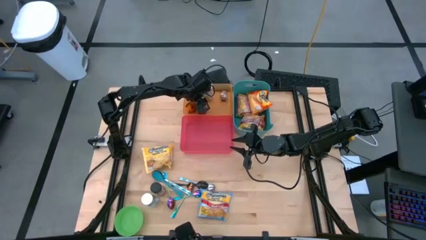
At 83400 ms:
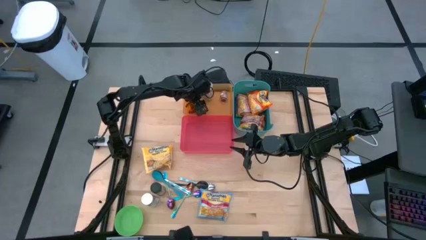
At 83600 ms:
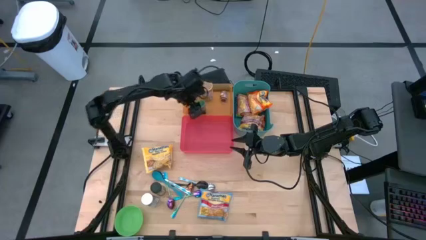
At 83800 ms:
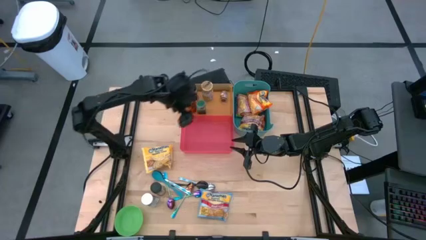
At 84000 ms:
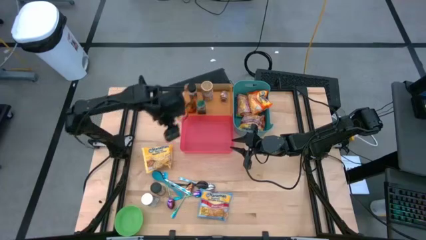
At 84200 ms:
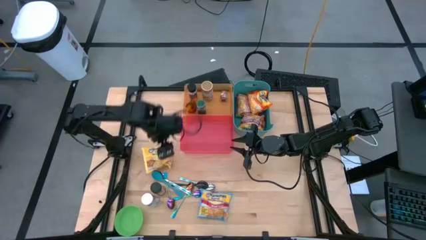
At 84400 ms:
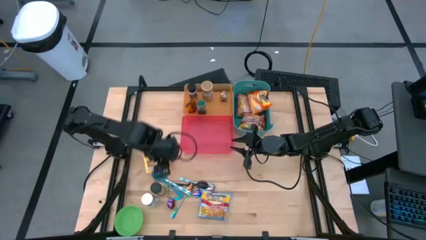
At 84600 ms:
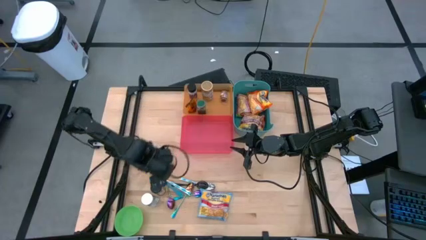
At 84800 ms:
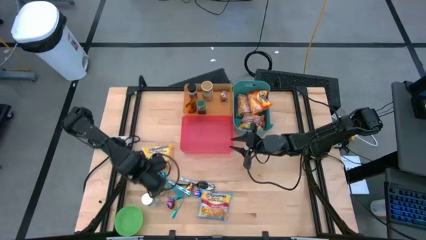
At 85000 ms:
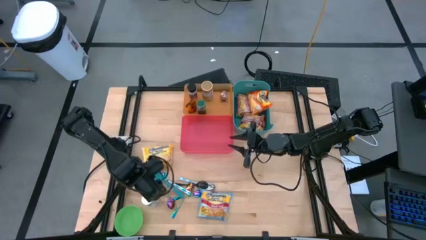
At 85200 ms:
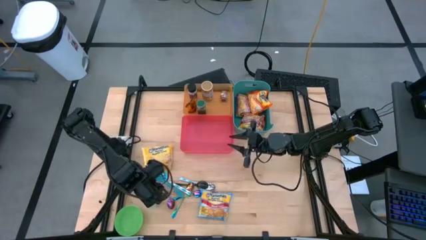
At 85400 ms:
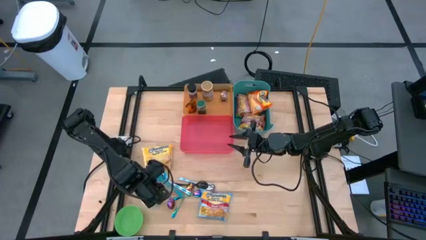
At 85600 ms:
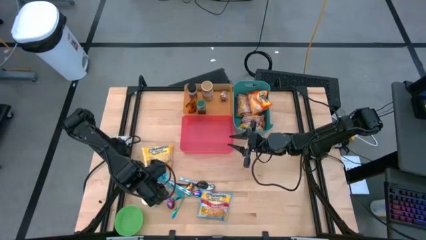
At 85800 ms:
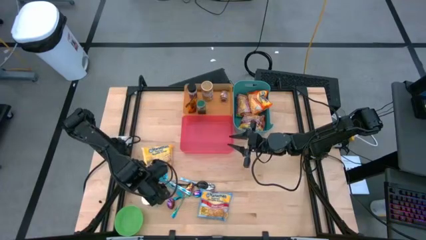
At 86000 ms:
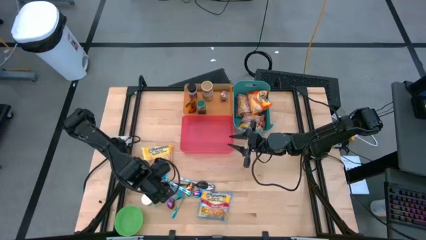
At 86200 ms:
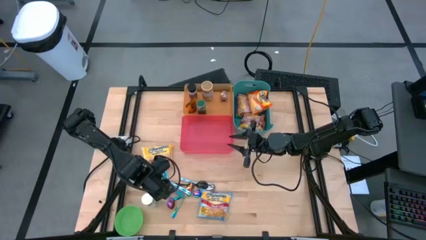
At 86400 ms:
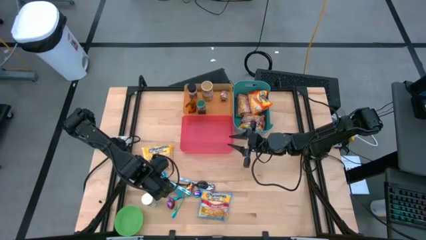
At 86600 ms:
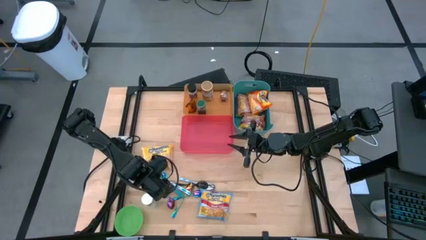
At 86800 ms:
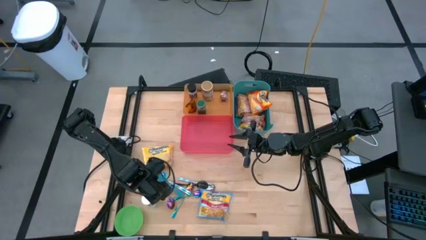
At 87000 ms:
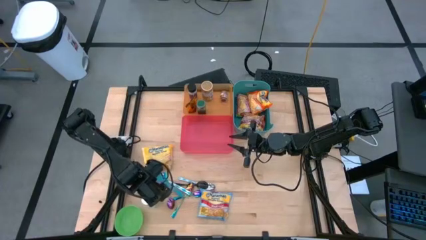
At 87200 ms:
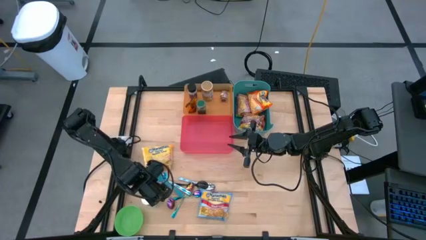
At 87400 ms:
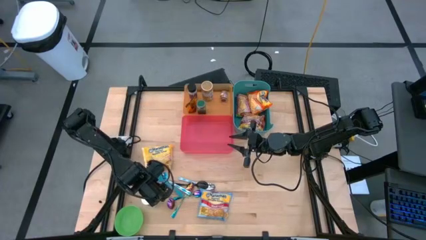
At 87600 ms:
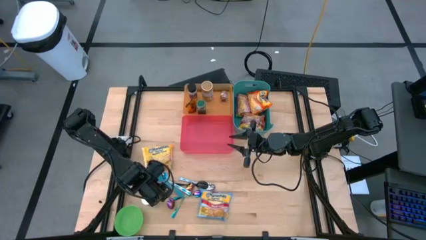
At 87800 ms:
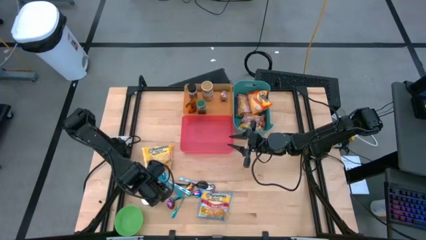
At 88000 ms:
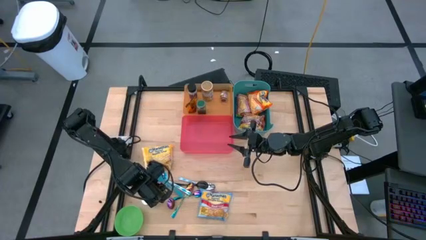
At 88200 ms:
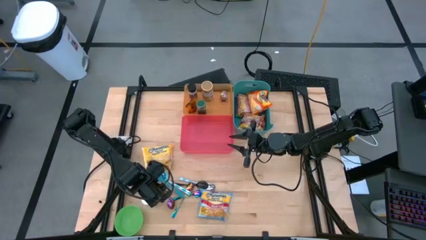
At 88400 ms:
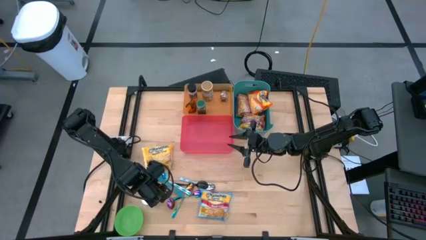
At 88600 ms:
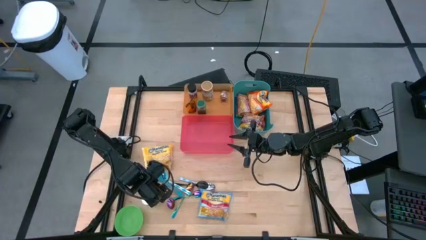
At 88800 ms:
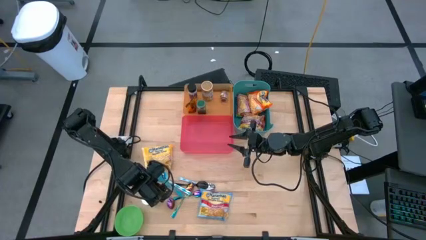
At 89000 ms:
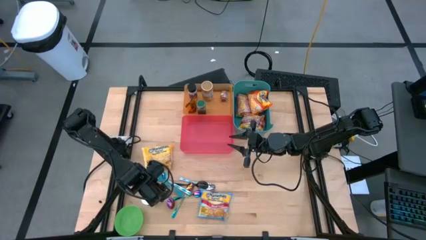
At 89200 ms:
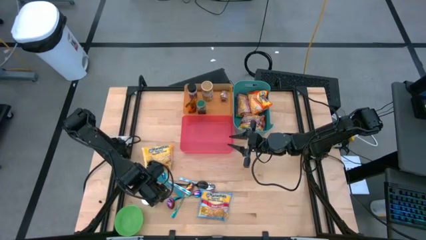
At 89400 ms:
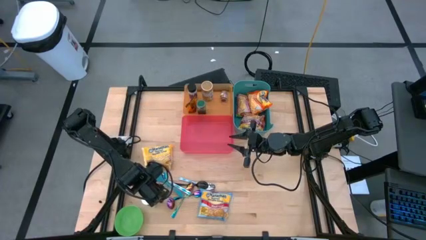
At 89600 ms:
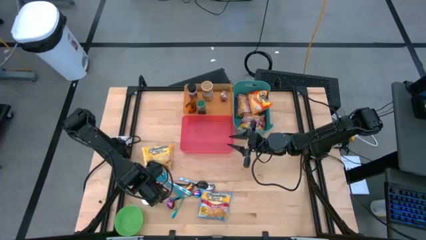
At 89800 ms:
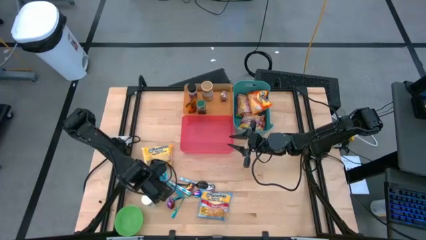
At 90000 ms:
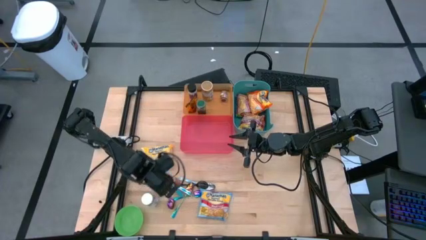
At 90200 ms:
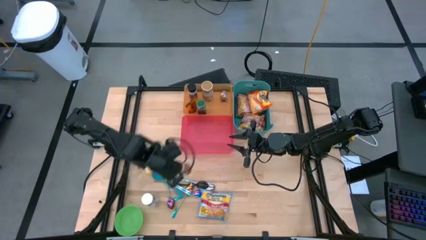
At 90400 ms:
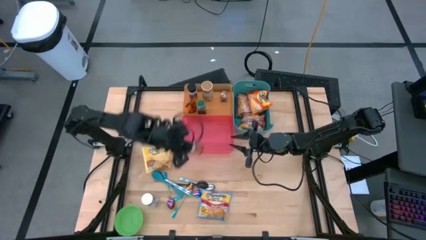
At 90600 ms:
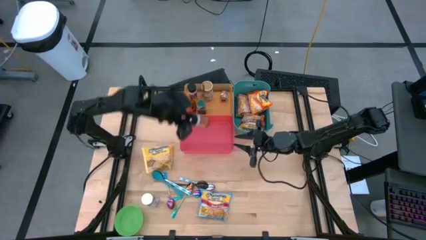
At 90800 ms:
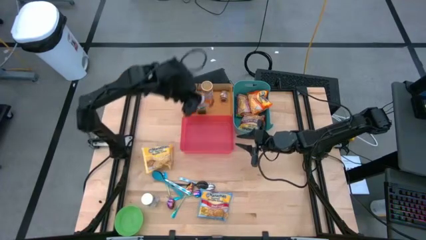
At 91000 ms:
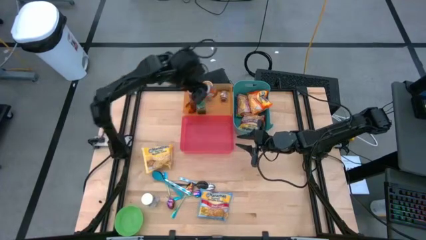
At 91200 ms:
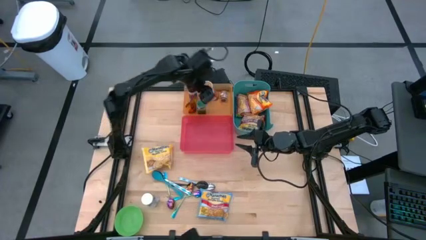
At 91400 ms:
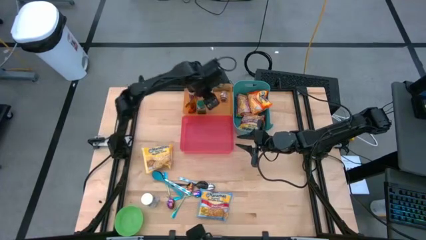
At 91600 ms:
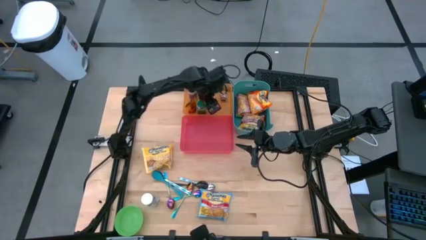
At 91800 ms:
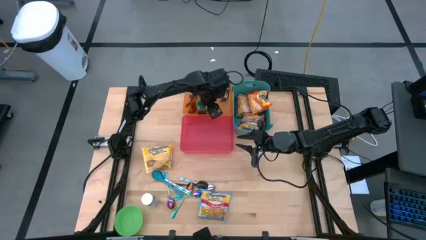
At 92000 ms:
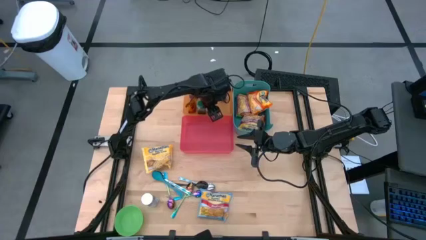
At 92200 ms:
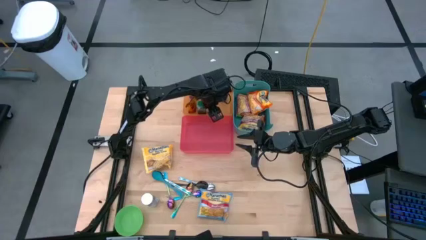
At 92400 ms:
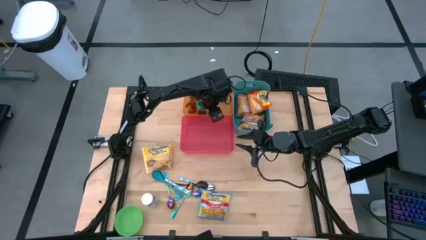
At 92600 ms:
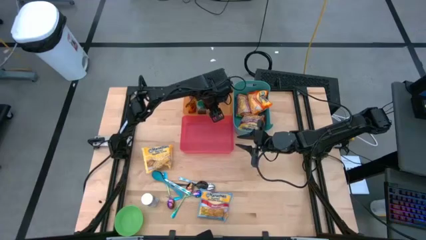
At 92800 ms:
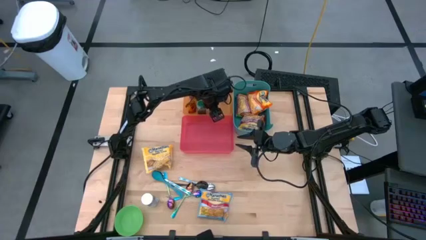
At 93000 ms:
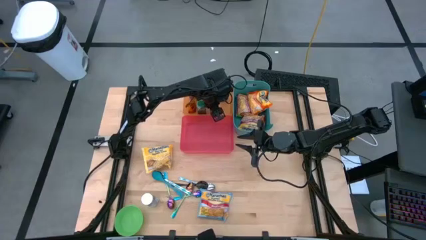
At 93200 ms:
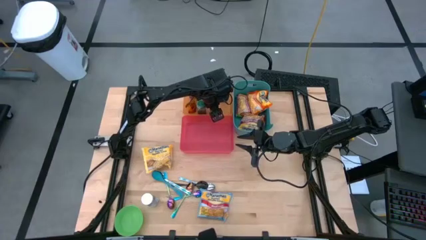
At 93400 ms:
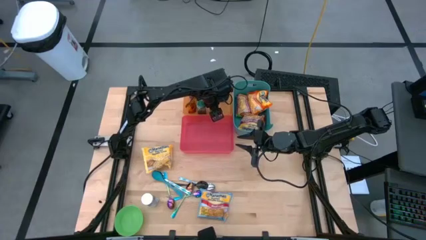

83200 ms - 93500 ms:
Task: Pick & Place Food Item
Put the orange spice bottle into the orange bin

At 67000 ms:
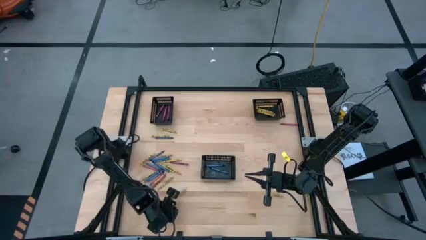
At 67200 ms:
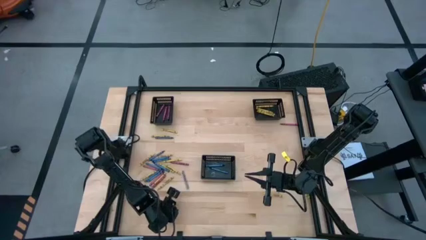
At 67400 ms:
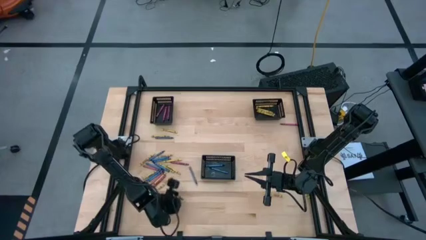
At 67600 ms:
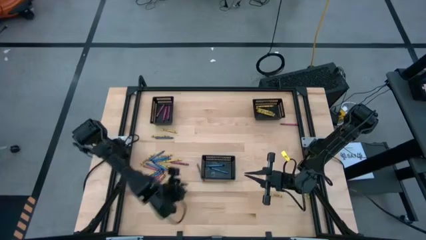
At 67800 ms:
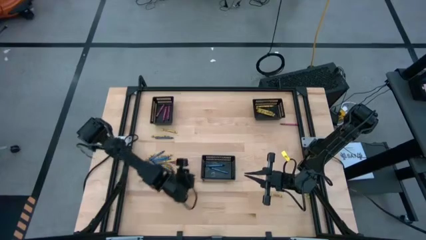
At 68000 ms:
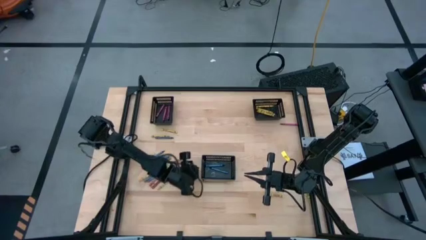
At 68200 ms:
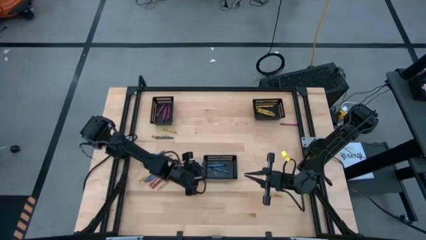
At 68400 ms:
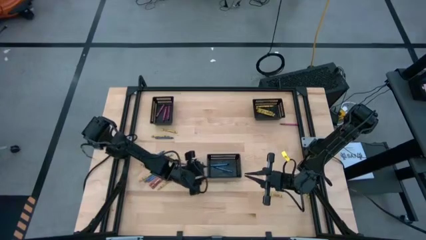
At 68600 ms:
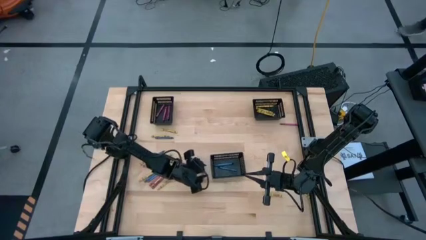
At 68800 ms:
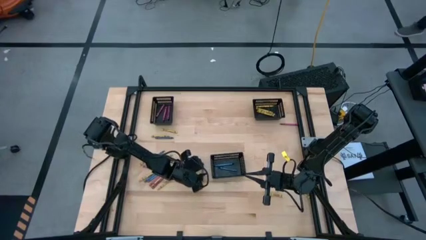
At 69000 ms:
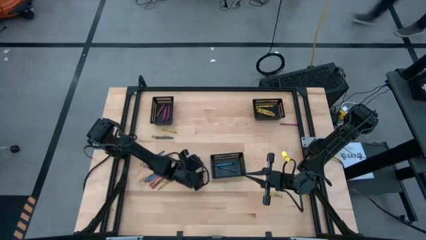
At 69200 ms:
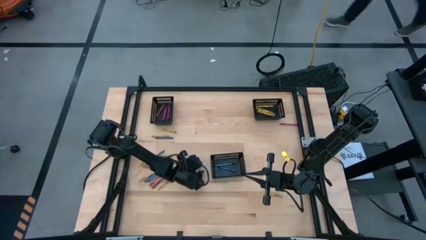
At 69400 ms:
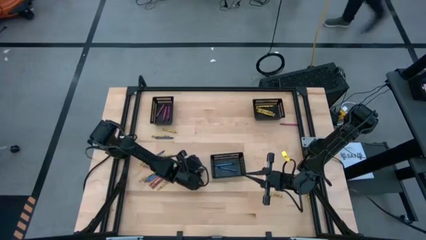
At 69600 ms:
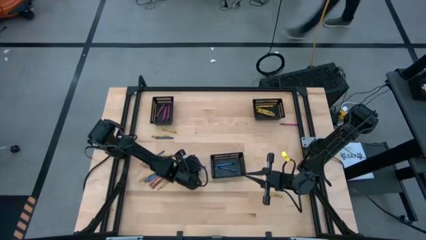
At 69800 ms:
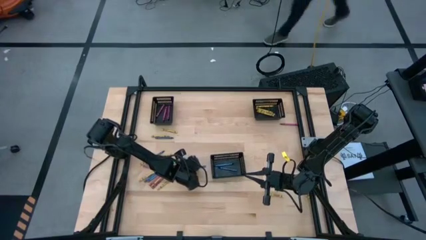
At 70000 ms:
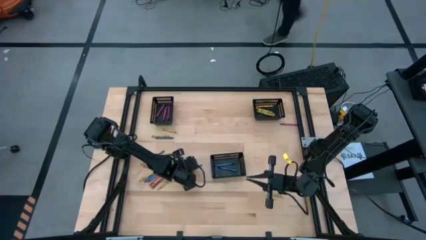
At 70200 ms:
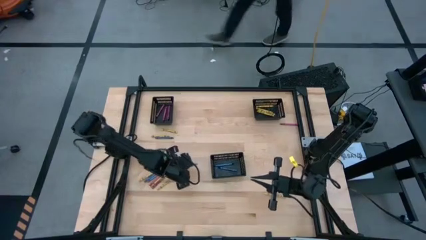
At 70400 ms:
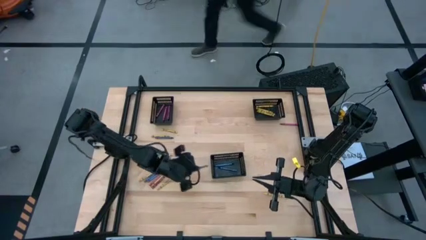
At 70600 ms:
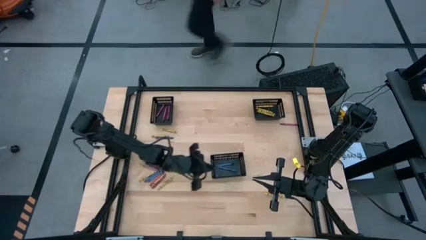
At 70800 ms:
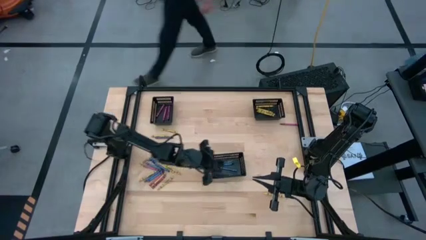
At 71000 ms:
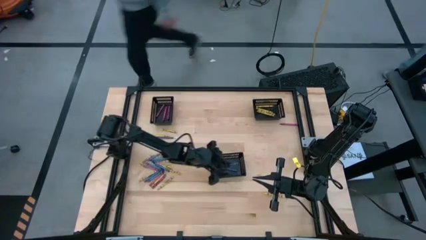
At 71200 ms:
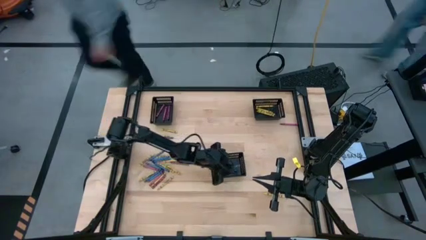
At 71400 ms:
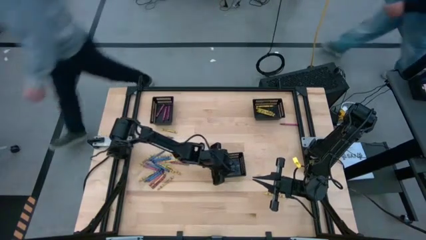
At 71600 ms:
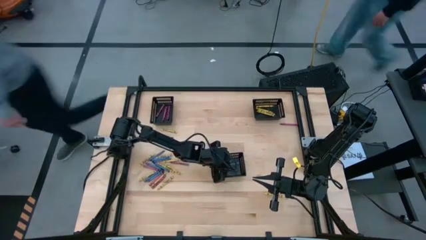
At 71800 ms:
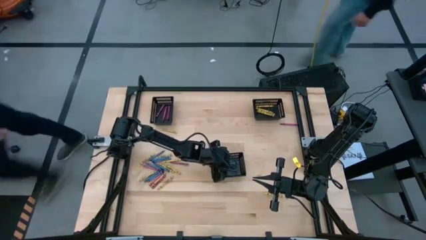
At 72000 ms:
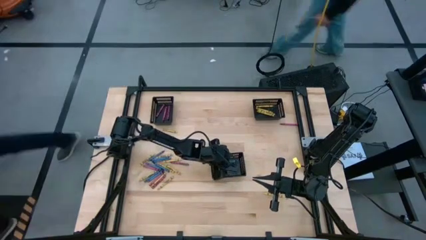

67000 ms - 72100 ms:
Task: Sort crayons
Put the blue crayon into the bottom black bin
